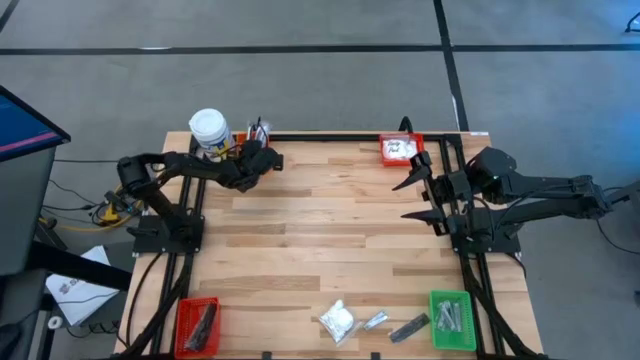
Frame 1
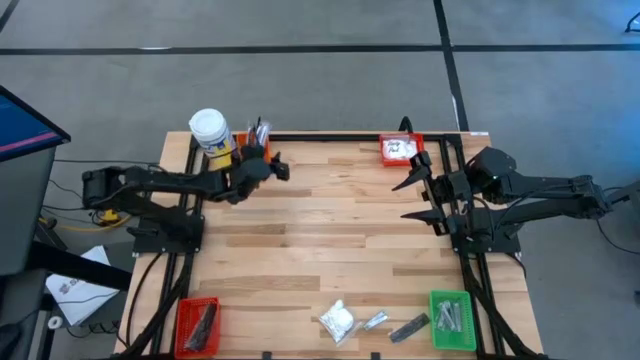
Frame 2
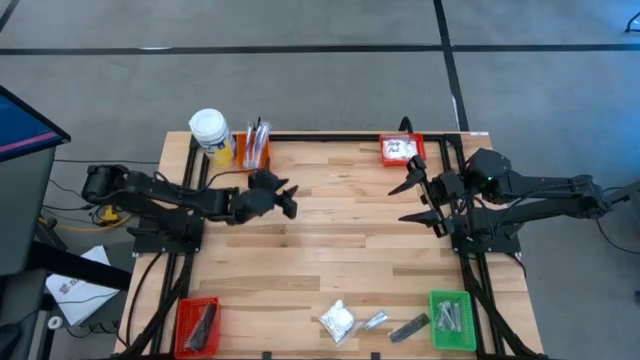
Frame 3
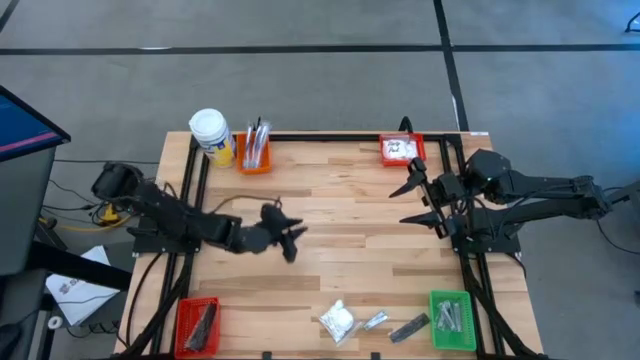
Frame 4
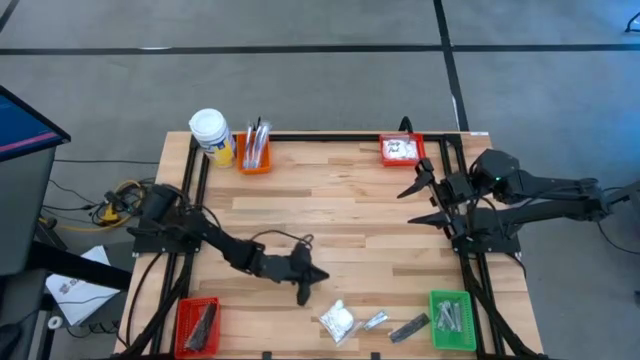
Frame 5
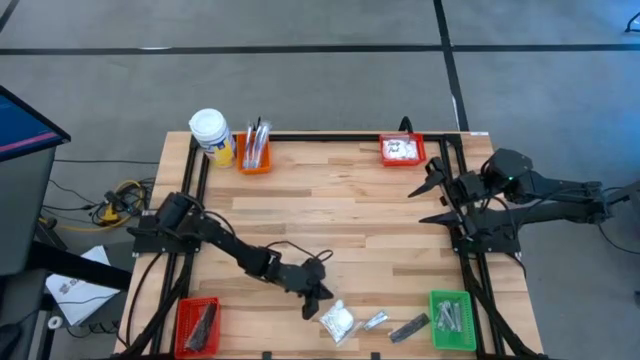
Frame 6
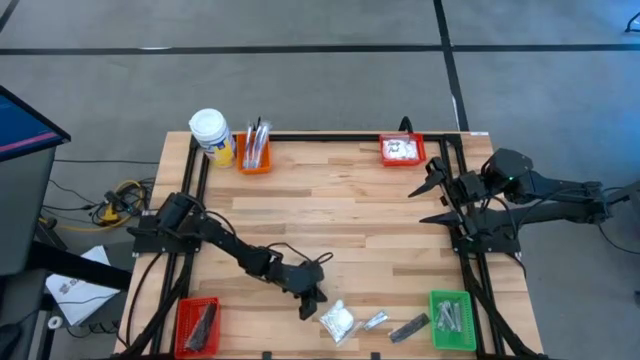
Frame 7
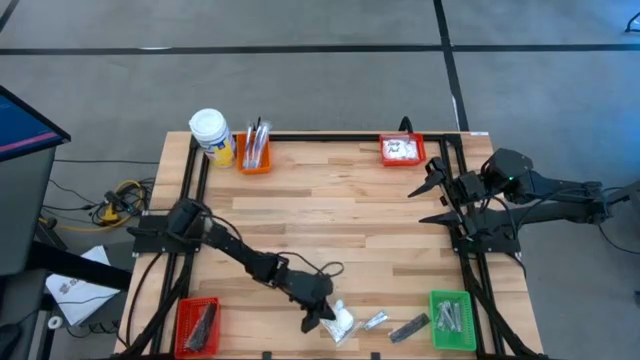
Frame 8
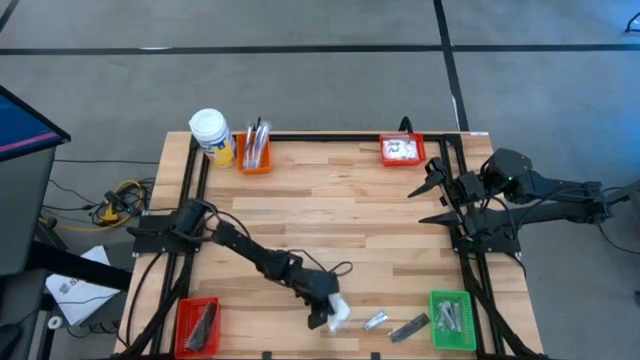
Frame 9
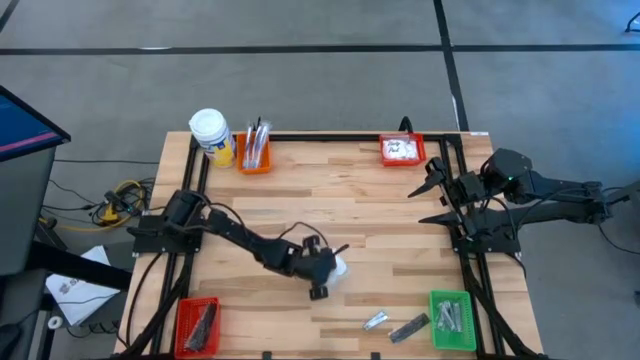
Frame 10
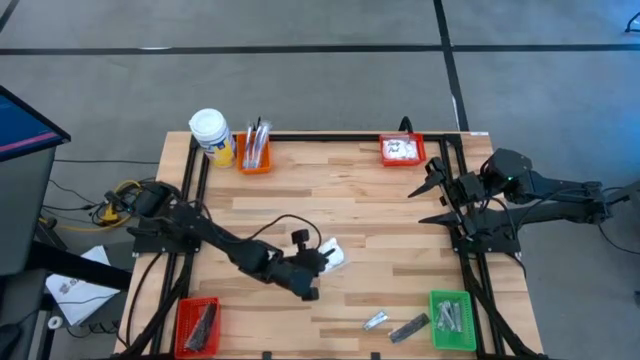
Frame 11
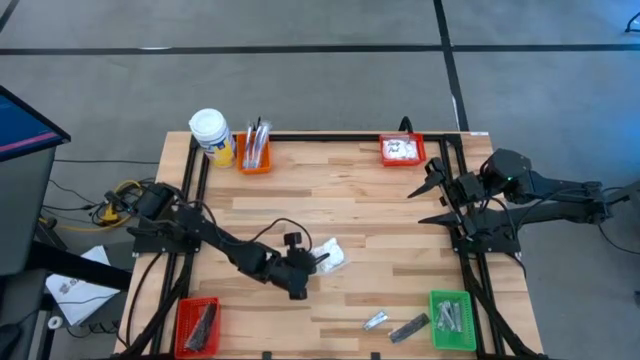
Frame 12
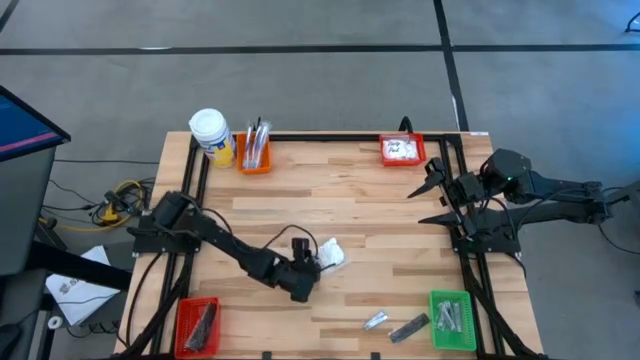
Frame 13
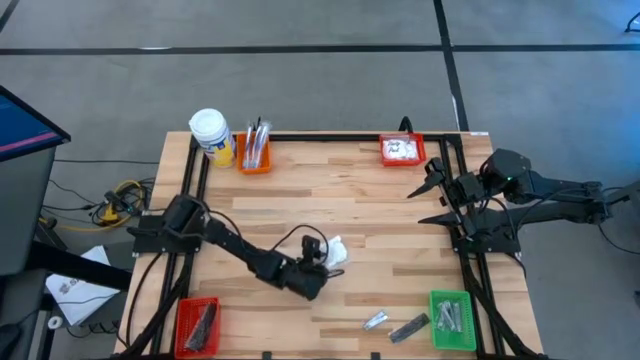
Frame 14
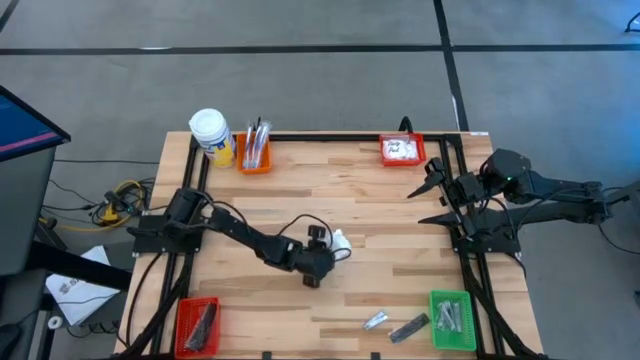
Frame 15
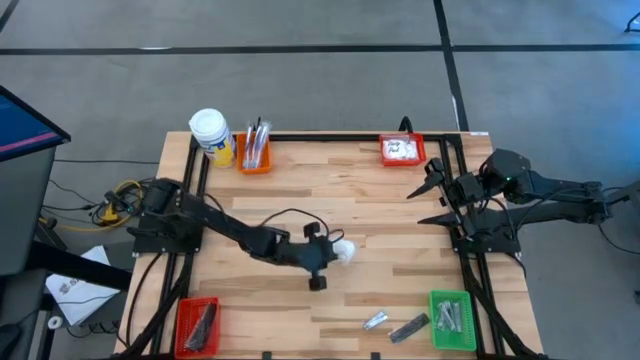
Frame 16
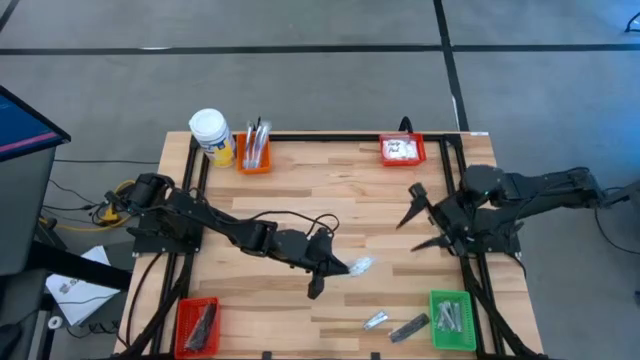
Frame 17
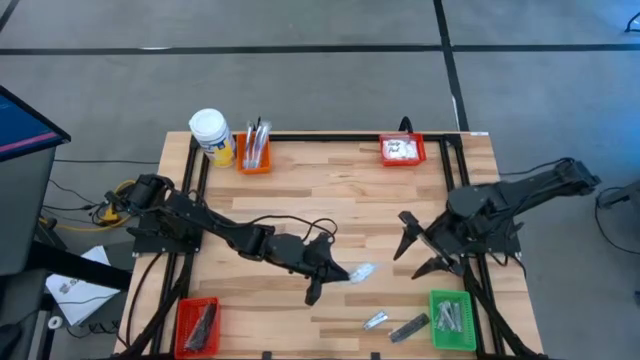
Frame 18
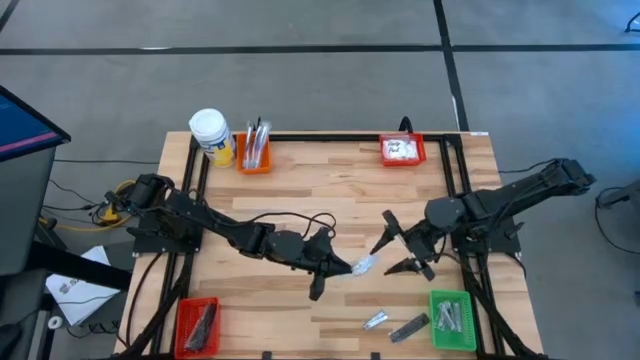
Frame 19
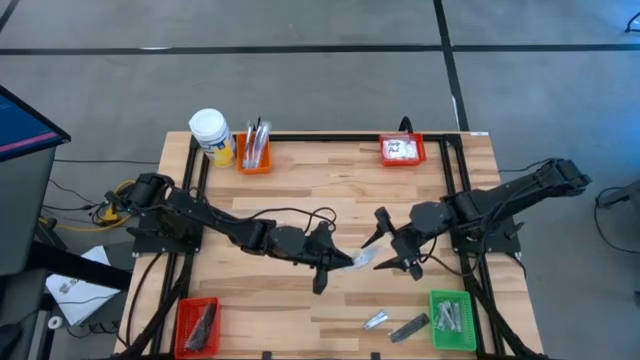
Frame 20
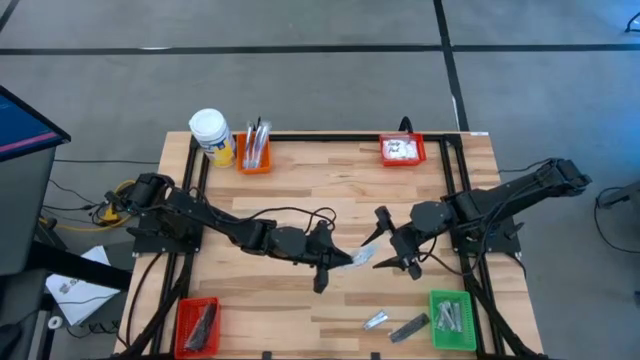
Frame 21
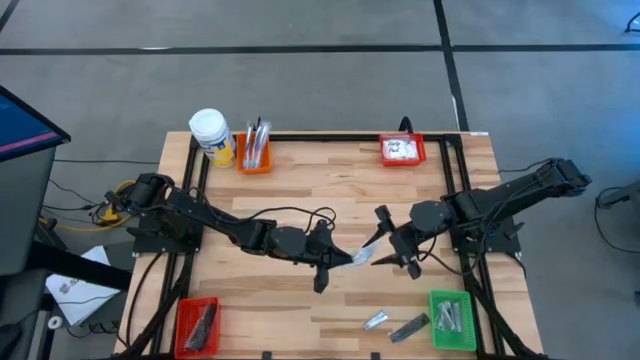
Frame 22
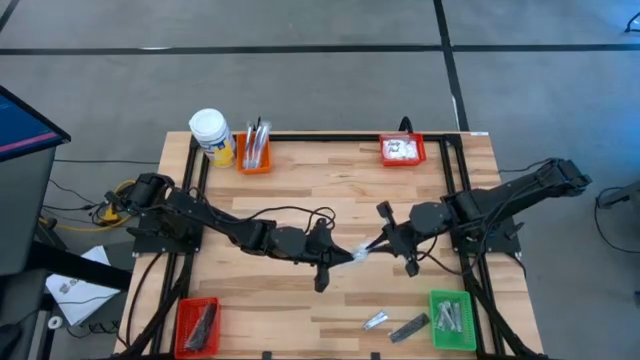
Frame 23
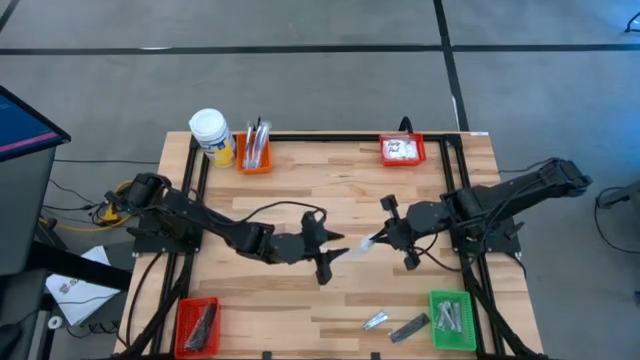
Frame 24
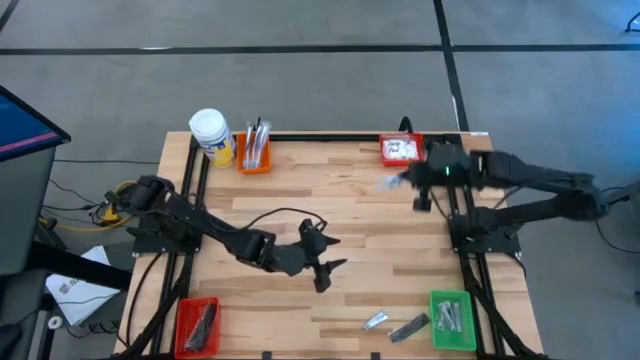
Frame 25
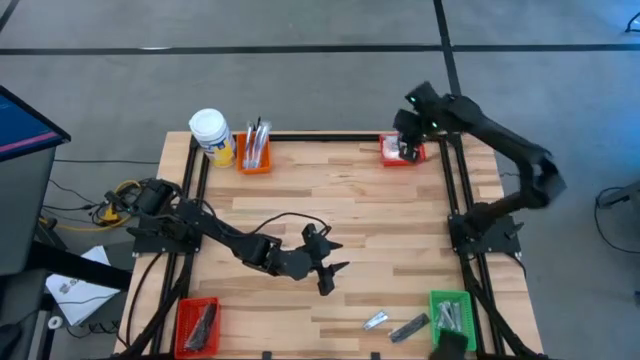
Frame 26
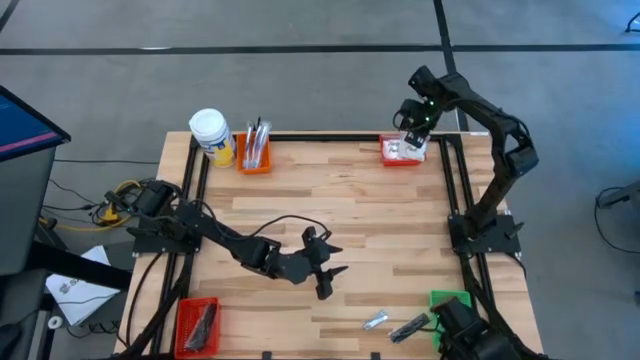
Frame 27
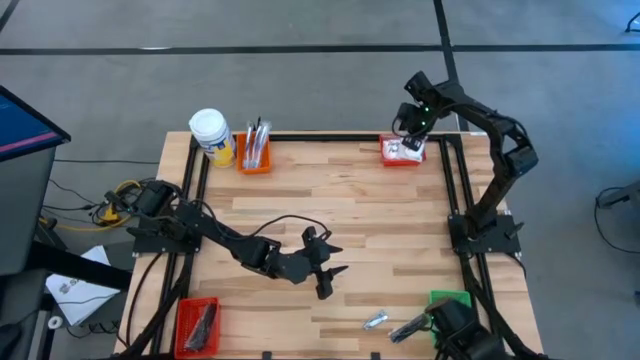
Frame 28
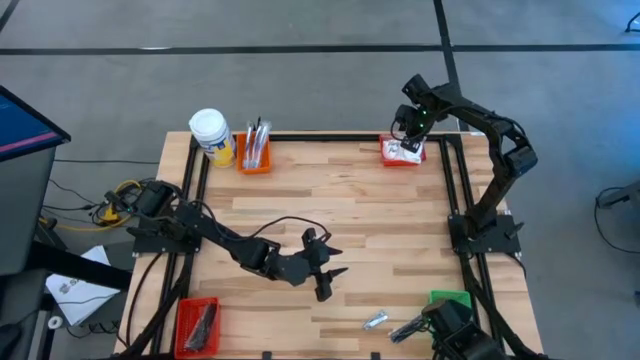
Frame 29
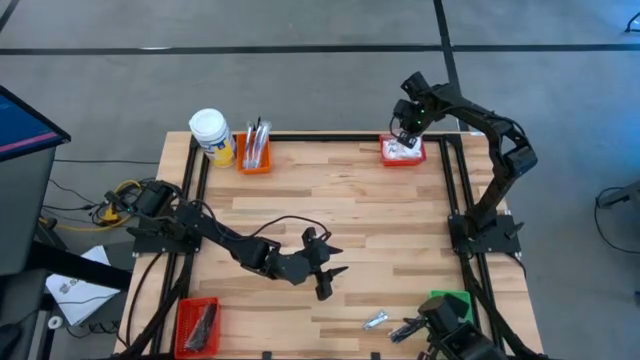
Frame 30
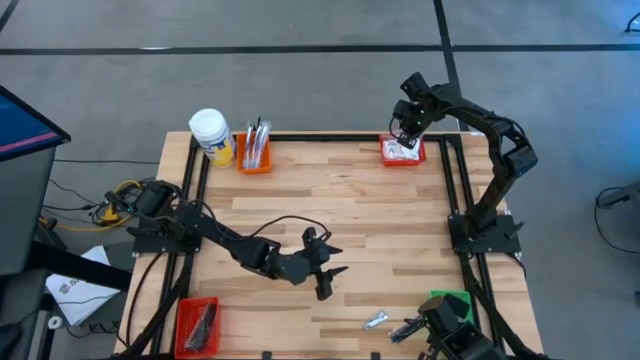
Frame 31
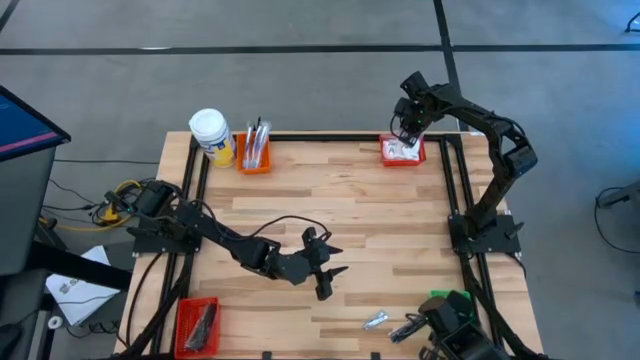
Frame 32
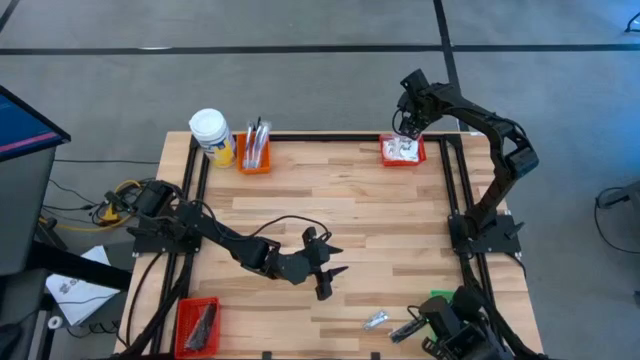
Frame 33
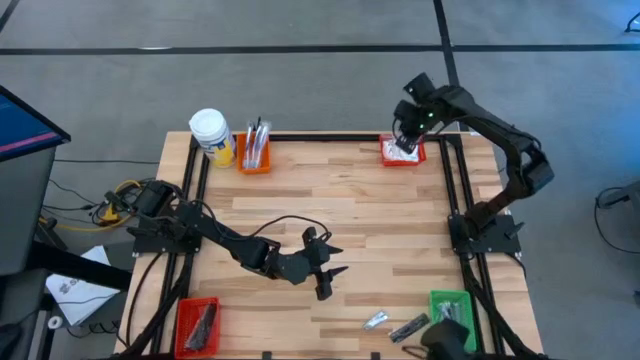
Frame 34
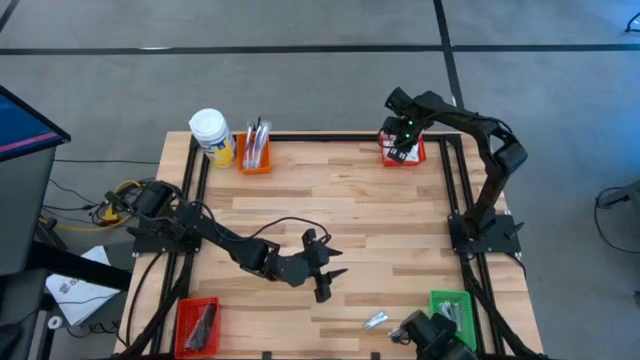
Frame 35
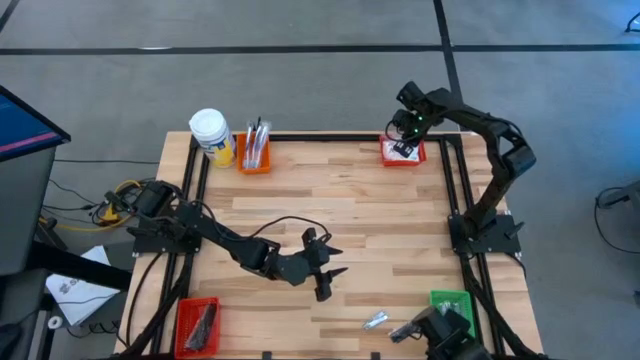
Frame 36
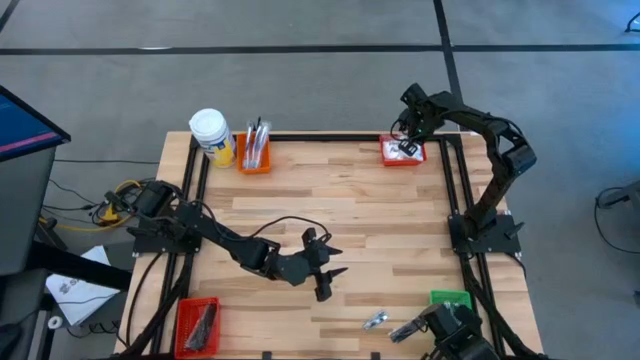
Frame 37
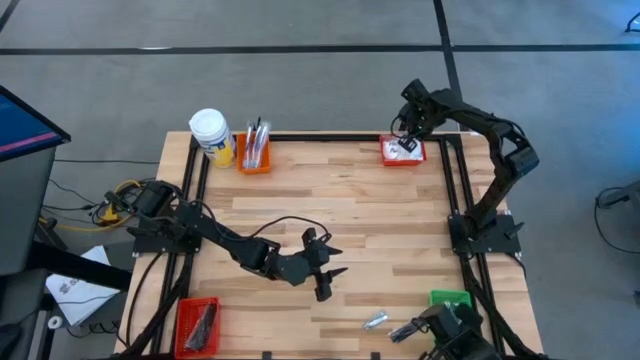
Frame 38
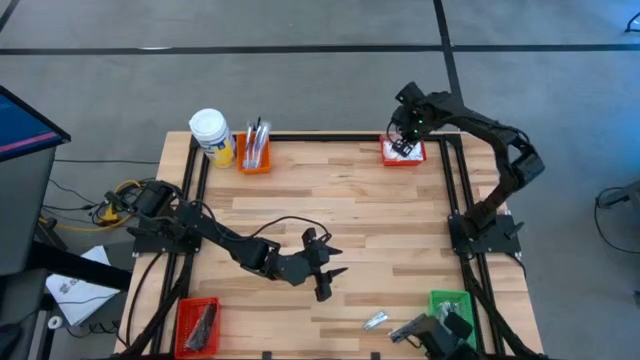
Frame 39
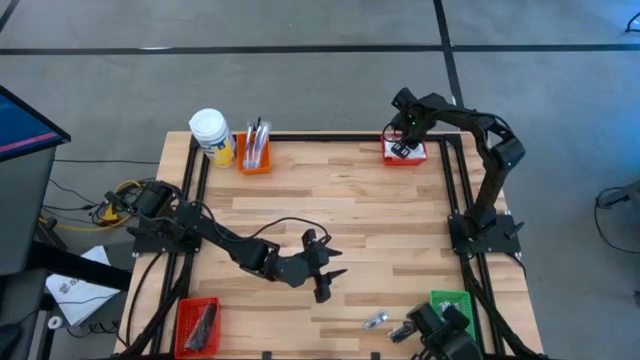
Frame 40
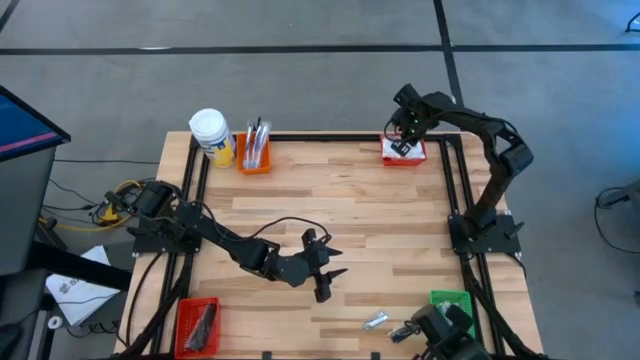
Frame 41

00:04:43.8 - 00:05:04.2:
Task: Pick & Place Travel size toiletries
Stack the cotton pack on top of the cotton bag in the red bin

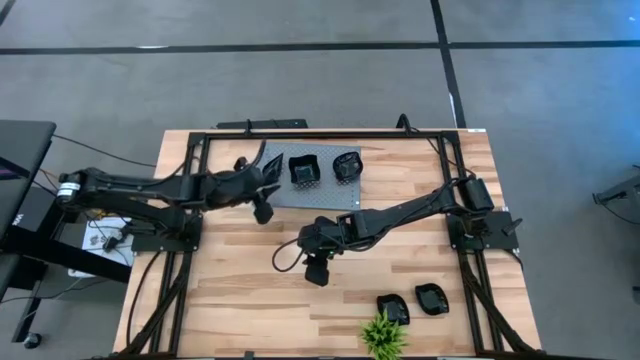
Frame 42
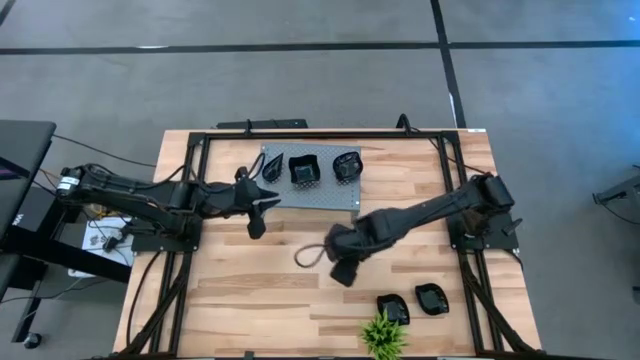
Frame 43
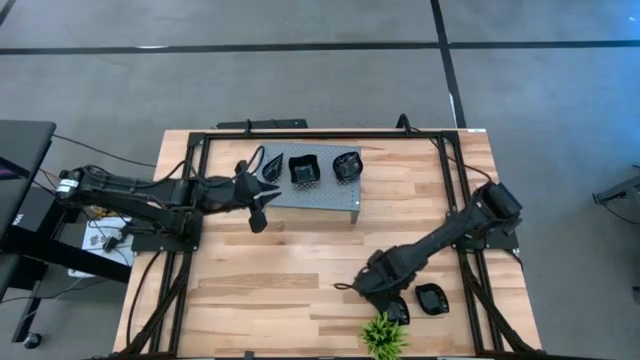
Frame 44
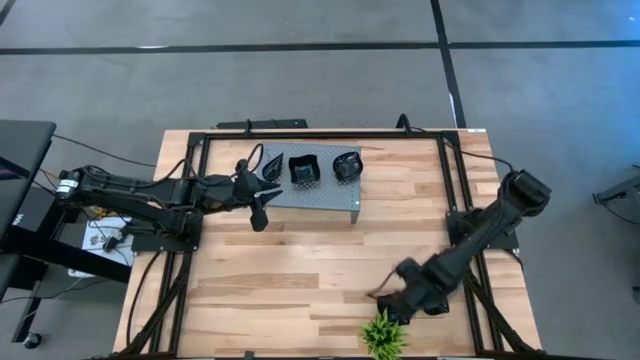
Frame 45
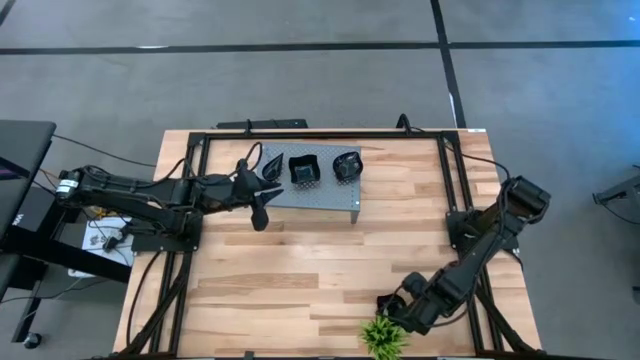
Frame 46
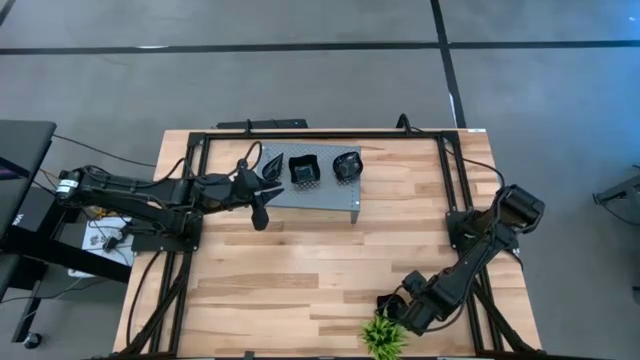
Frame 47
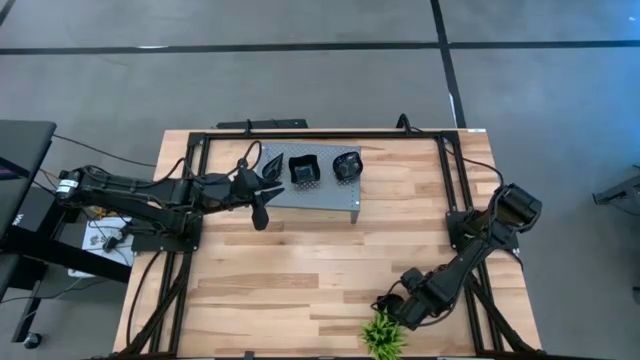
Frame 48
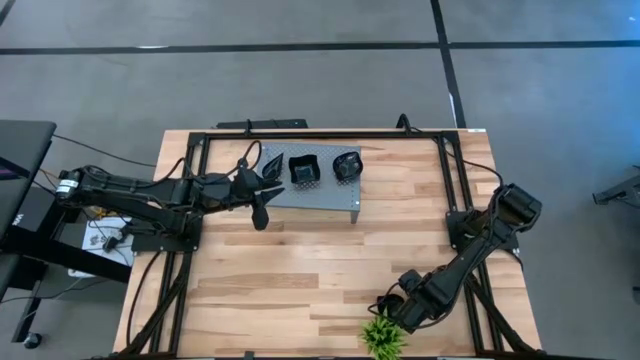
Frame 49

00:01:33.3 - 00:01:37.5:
Task: Pick & Place Mini shaped plates
Stack the black leaf-shaped plate on top of the black leaf-shaped plate on the shelf
